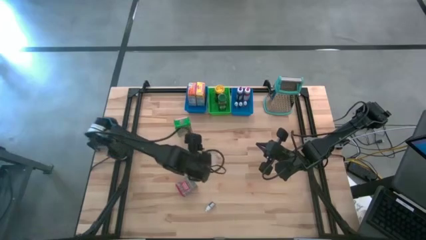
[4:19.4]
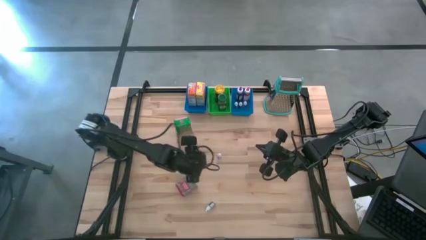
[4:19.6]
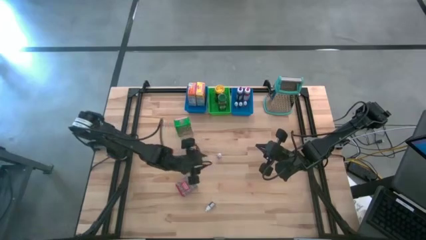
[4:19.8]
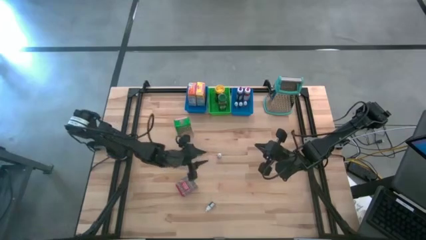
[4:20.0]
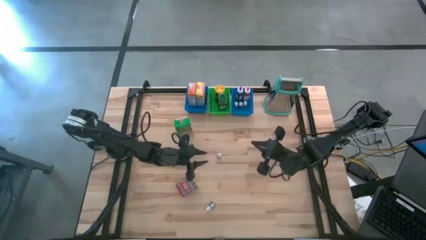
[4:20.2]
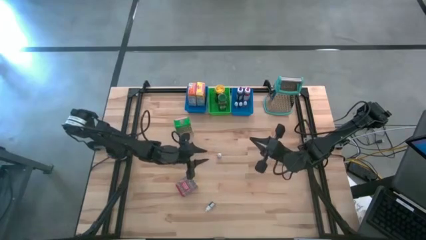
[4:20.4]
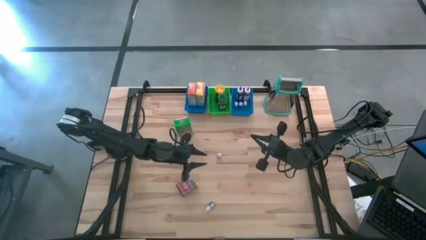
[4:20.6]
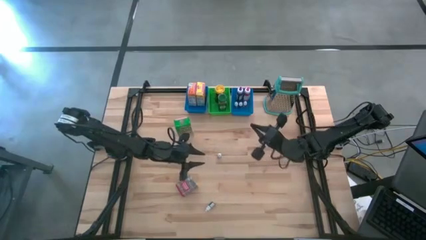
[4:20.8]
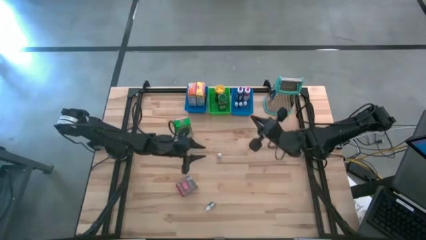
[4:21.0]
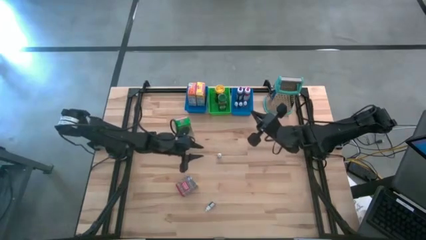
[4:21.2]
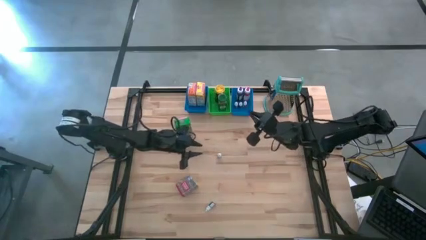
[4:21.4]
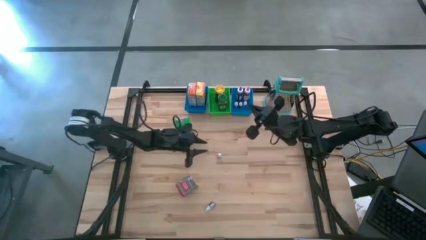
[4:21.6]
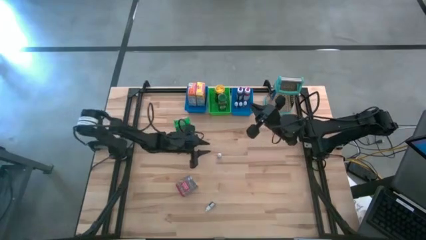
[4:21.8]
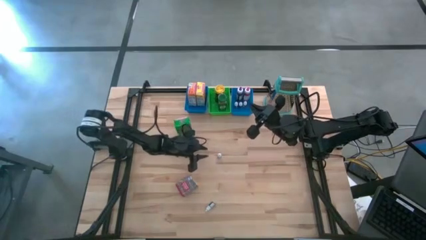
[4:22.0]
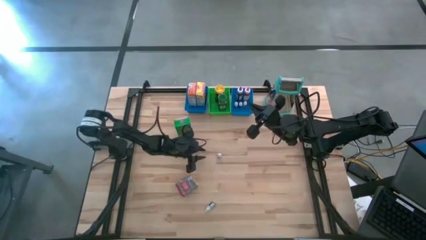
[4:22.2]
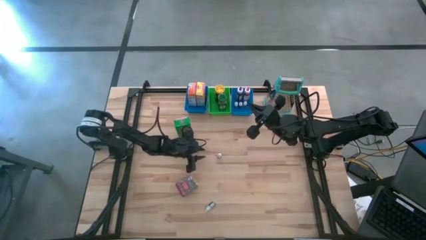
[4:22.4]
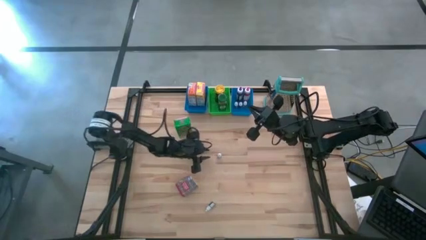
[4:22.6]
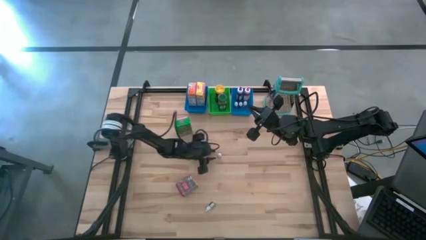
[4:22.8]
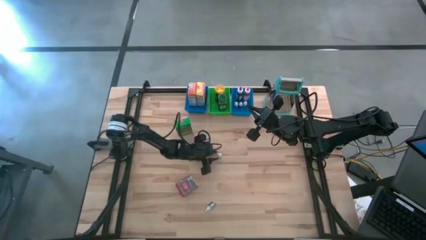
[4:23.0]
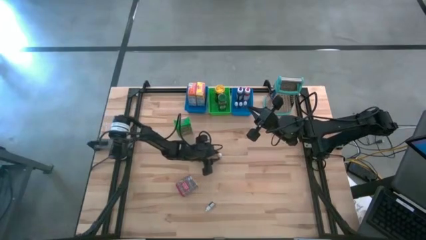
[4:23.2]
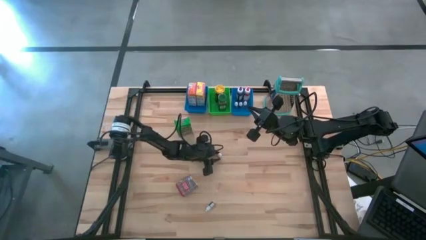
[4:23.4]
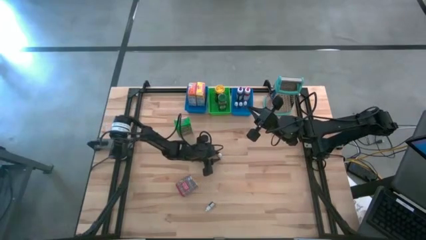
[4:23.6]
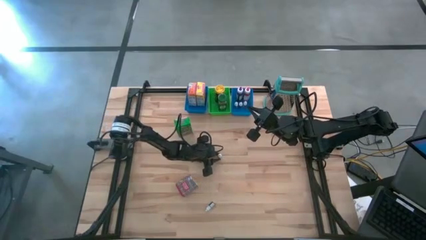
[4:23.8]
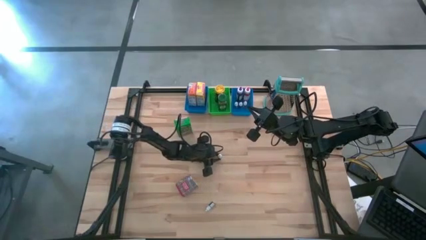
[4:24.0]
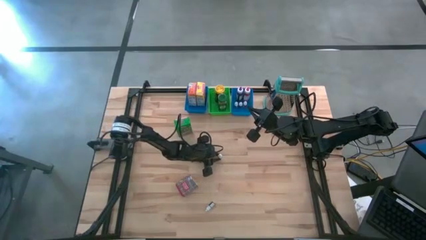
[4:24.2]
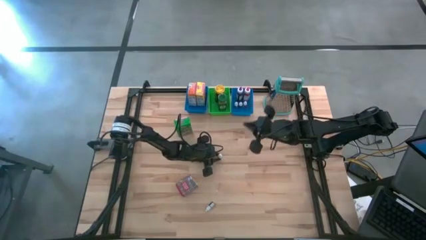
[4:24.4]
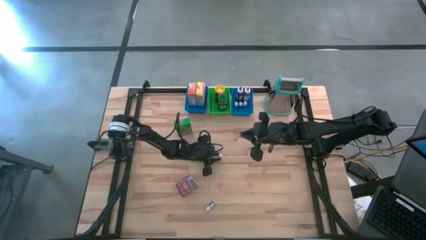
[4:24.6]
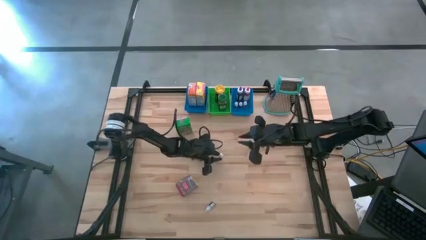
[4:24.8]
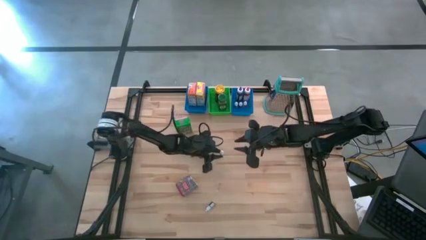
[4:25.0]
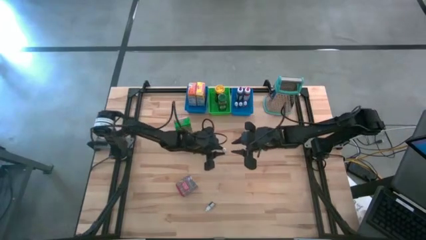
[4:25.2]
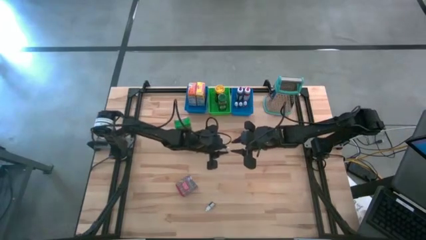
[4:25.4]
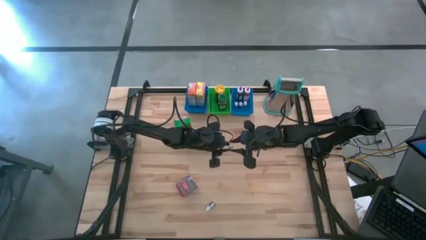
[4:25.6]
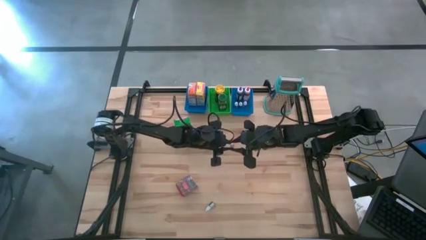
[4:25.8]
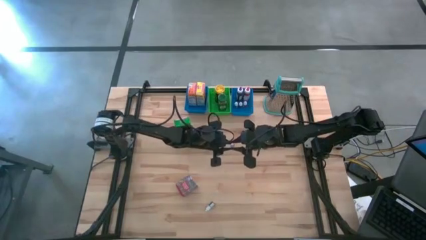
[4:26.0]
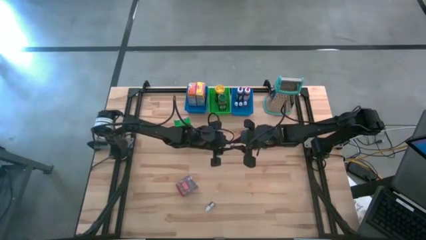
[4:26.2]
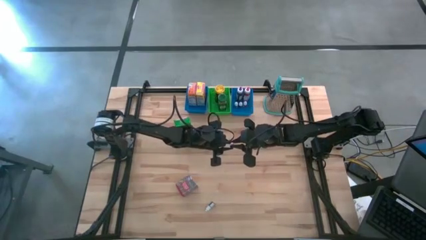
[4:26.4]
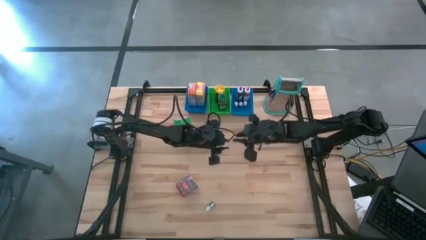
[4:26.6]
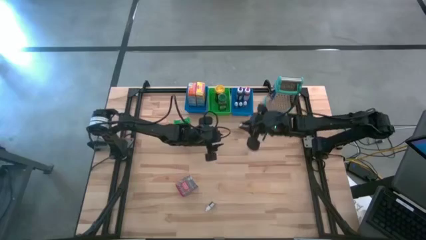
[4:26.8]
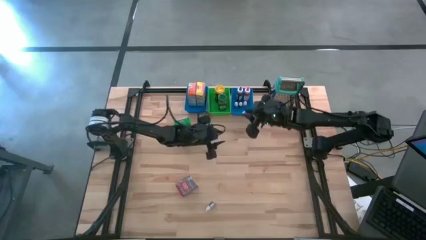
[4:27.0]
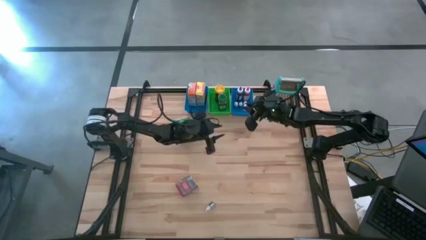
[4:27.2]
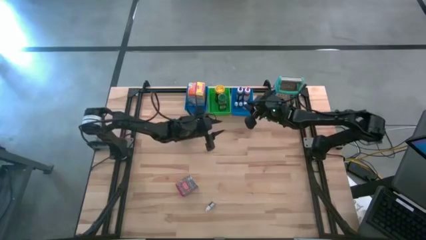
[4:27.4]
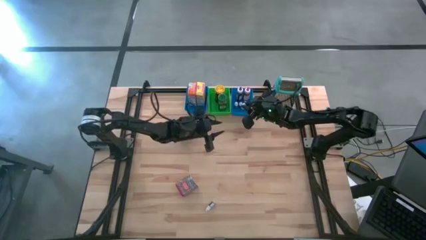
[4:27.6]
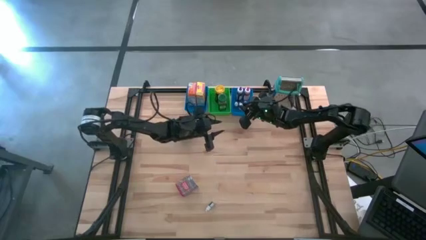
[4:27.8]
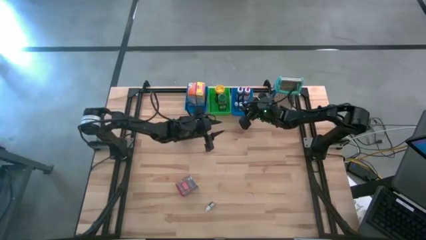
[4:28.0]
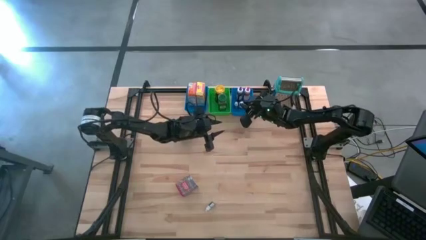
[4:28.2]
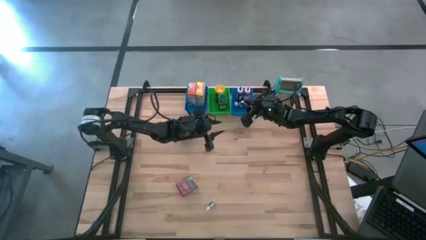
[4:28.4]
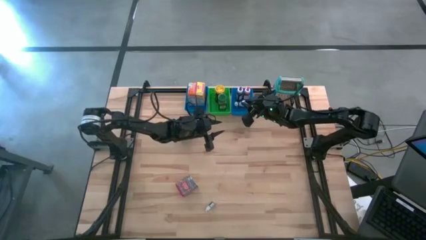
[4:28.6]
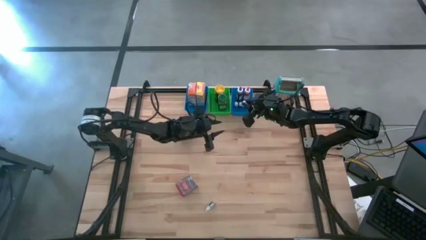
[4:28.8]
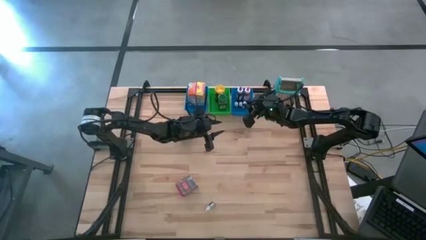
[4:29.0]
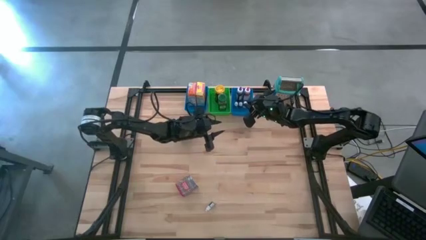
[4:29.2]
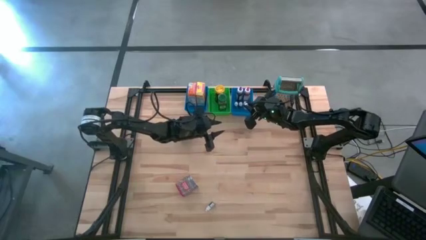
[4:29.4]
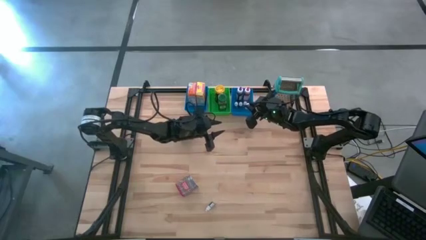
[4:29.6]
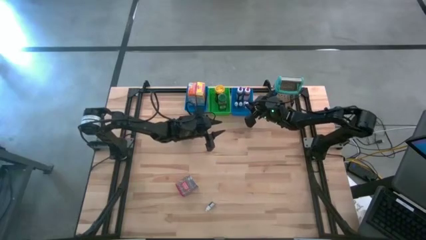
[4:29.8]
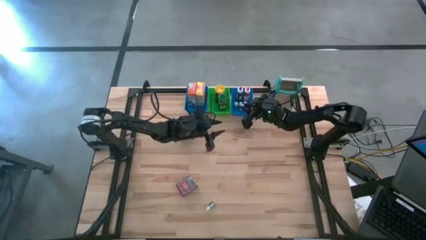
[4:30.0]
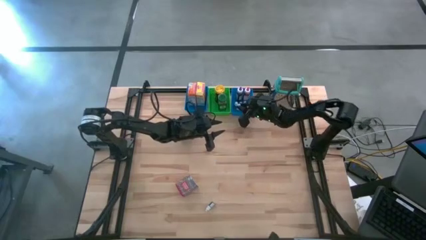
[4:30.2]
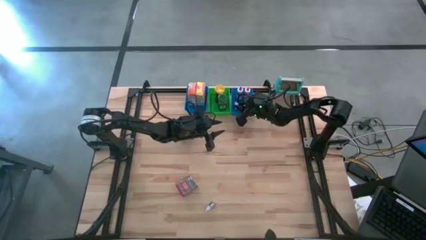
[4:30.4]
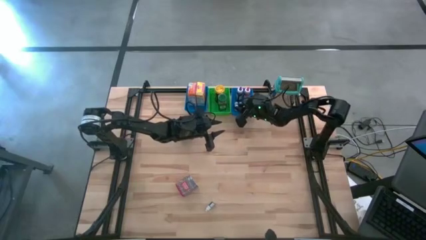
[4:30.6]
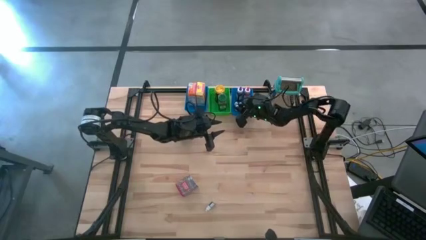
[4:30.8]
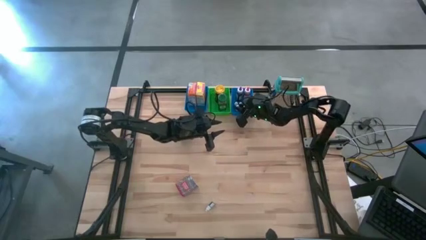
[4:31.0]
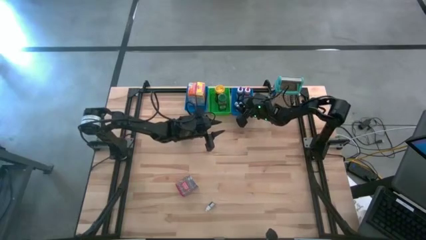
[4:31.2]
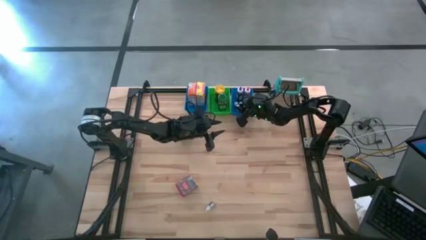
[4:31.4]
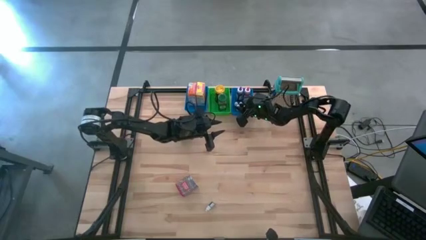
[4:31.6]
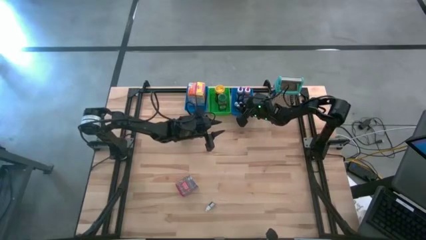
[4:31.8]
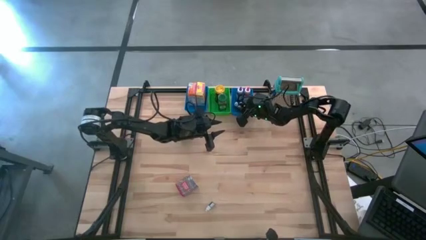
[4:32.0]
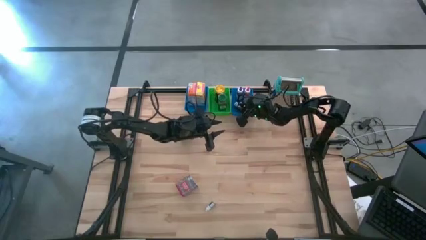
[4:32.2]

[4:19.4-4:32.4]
Task: Pick & Place Kitchen Items
Put the small red food coloring bottle into the right blue bin

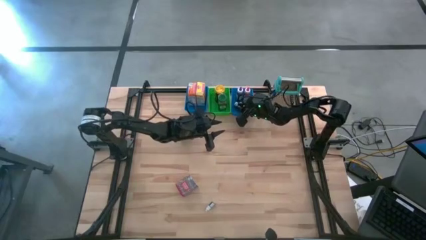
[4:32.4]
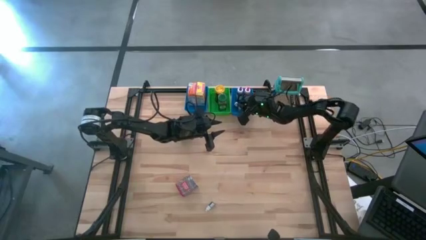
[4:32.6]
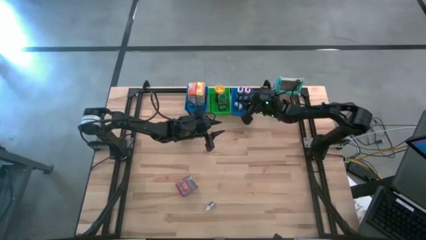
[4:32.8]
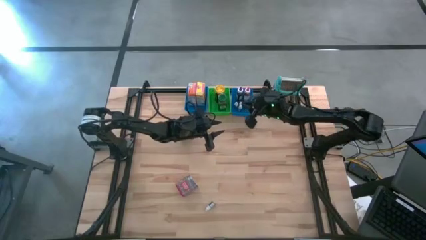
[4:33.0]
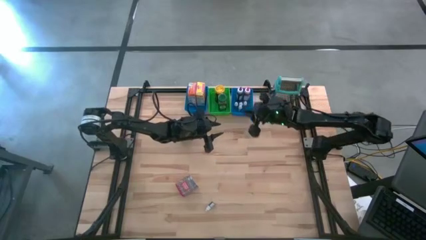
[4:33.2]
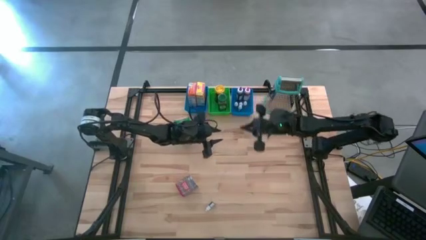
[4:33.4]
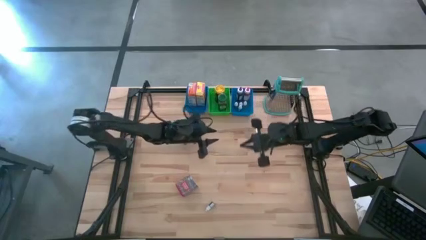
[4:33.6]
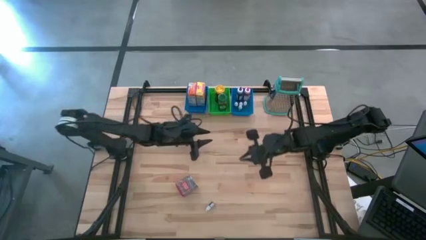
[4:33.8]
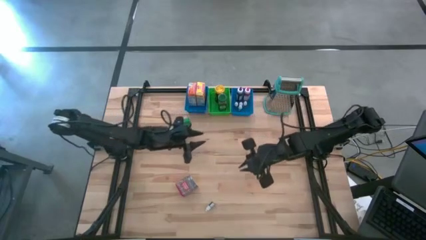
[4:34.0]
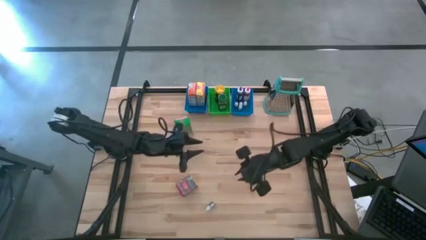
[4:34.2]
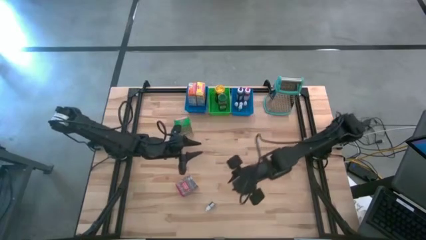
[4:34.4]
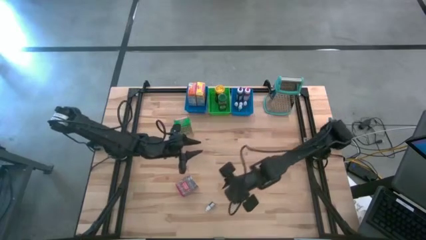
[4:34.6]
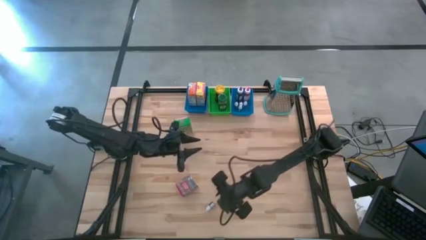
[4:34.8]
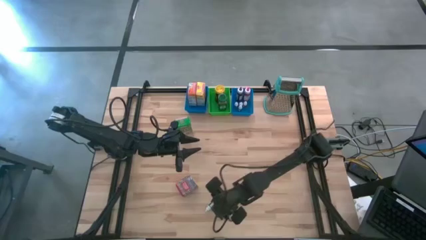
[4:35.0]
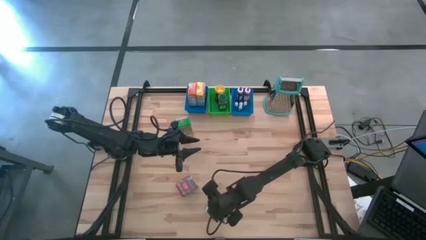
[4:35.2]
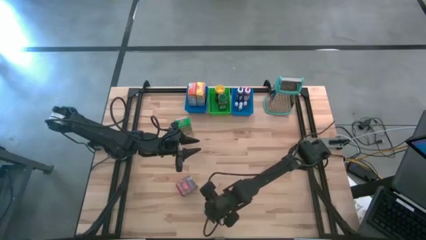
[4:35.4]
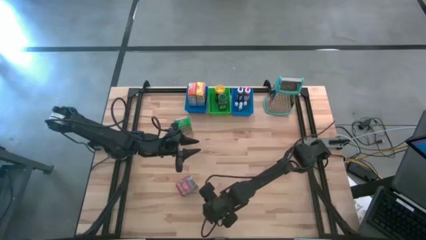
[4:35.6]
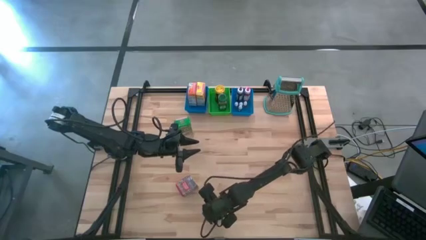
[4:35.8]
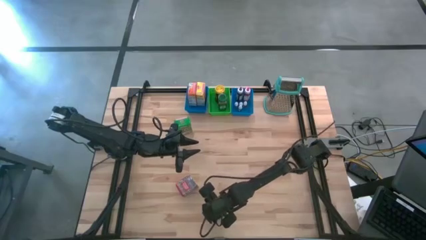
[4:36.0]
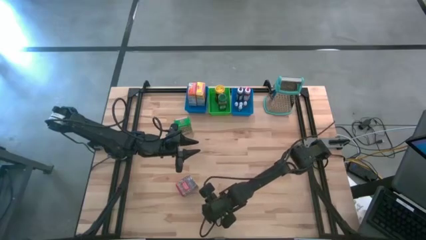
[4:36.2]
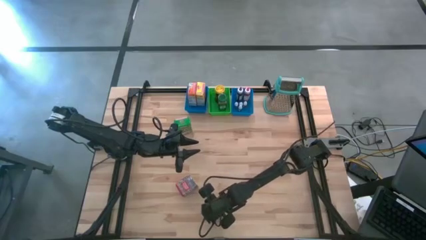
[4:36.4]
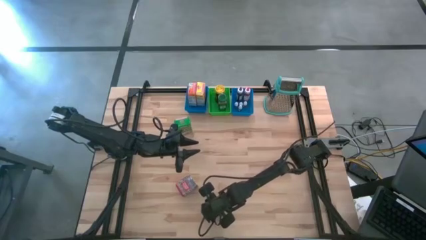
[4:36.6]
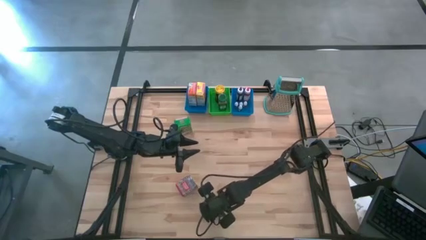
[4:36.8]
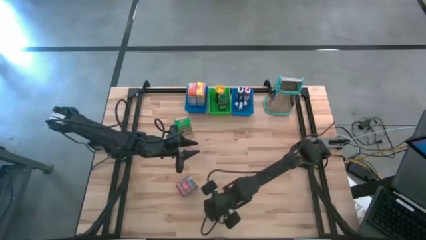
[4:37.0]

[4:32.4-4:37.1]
Put the small purple food coloring bottle into the right blue bin

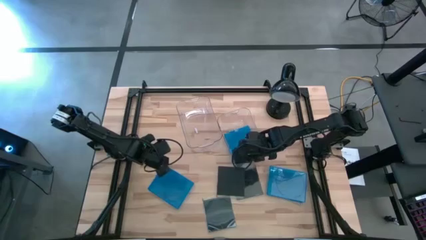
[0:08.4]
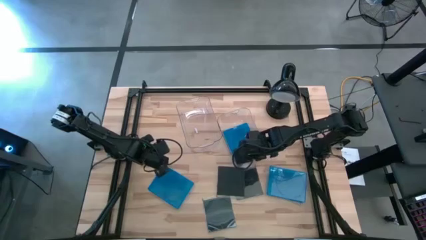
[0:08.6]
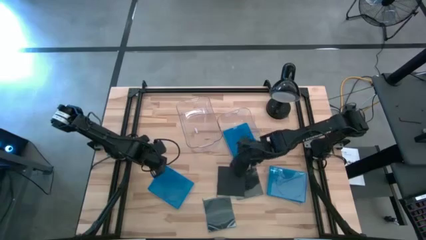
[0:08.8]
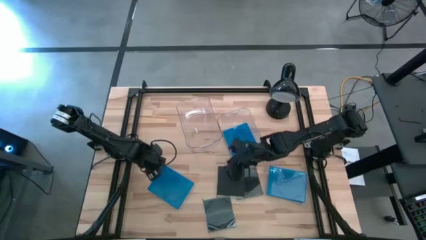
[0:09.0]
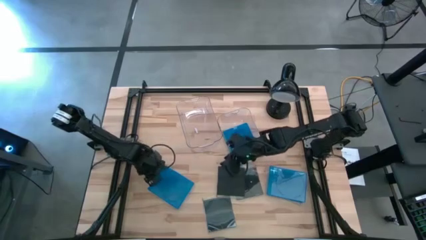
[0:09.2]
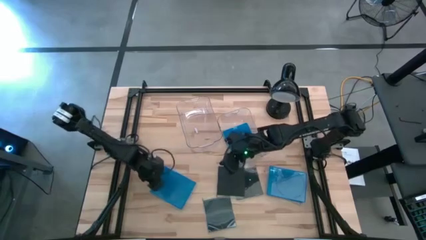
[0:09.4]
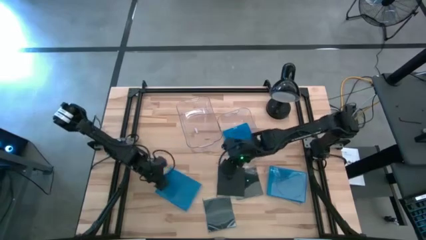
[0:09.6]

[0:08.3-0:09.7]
Task: Pick & place jewel cases by type
Adjust the blue CD case
